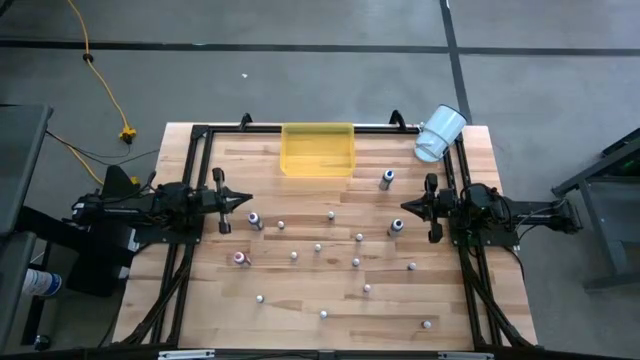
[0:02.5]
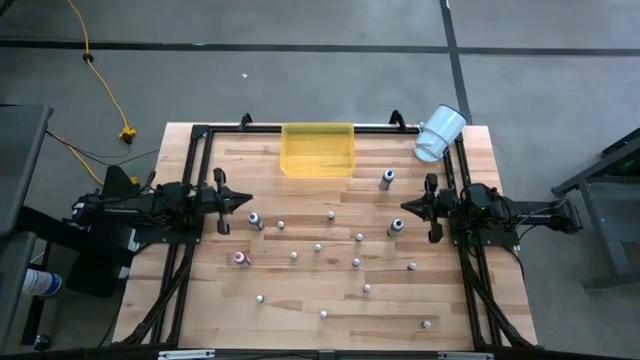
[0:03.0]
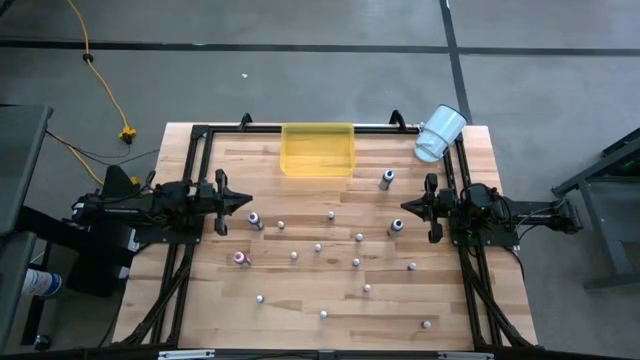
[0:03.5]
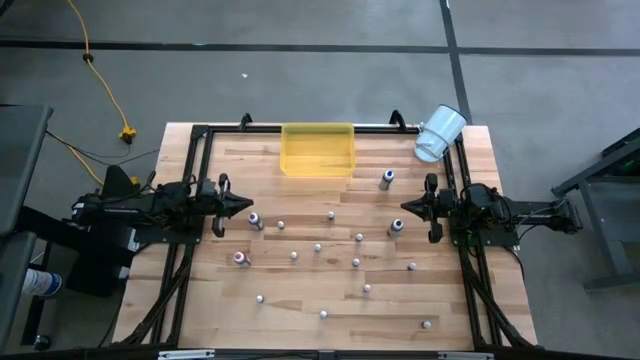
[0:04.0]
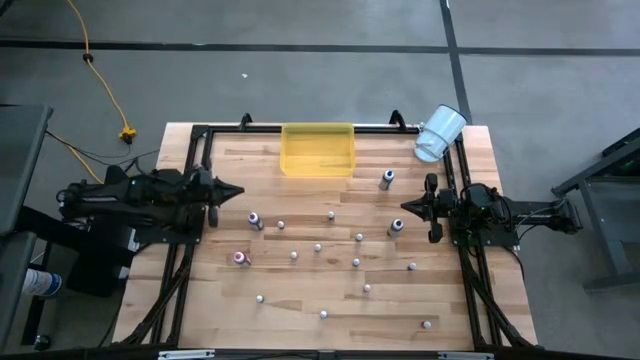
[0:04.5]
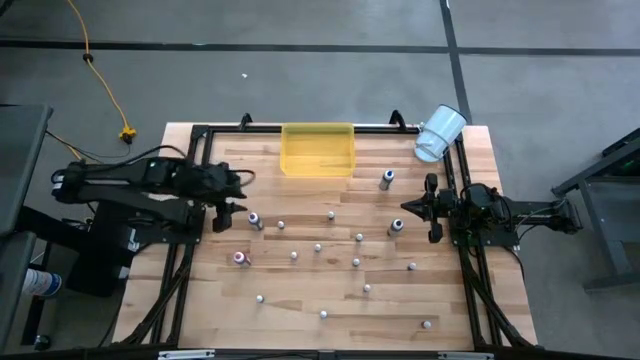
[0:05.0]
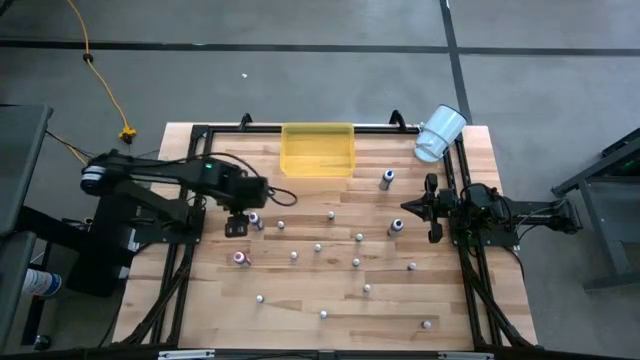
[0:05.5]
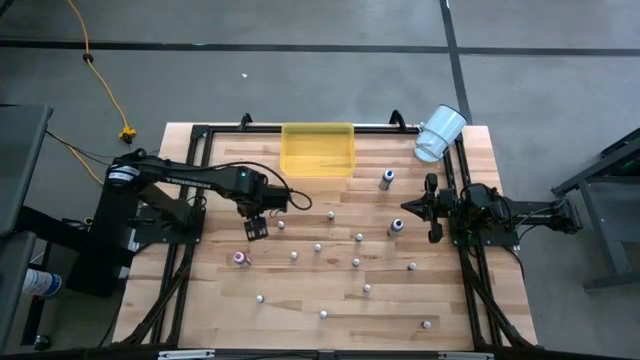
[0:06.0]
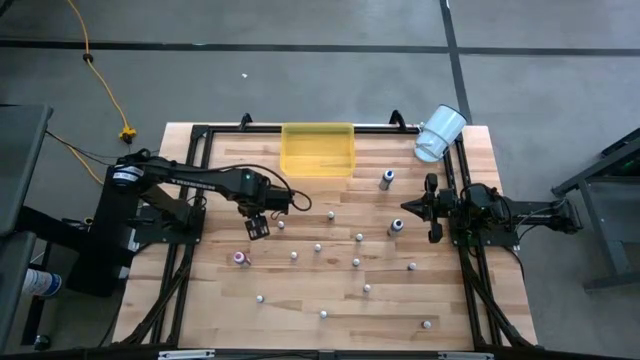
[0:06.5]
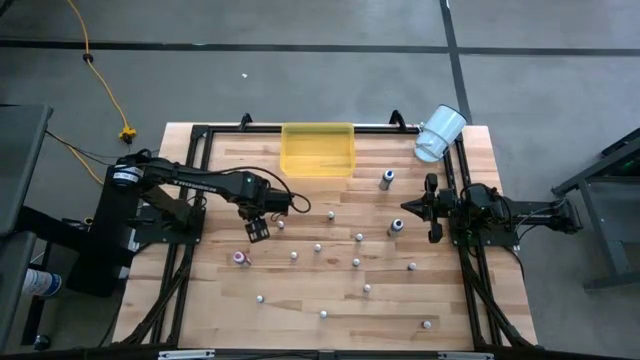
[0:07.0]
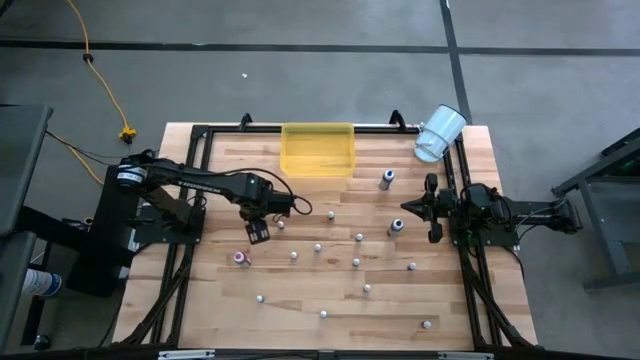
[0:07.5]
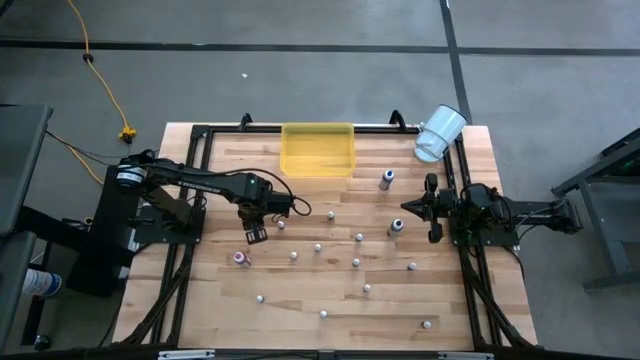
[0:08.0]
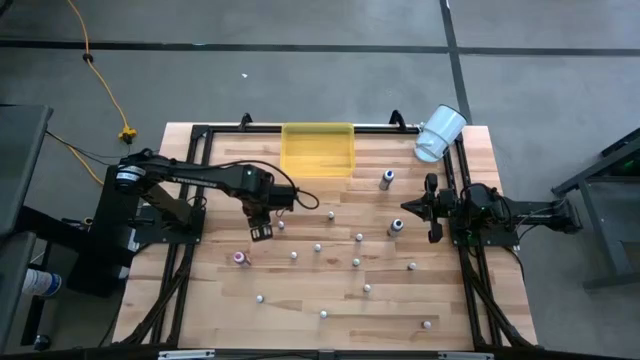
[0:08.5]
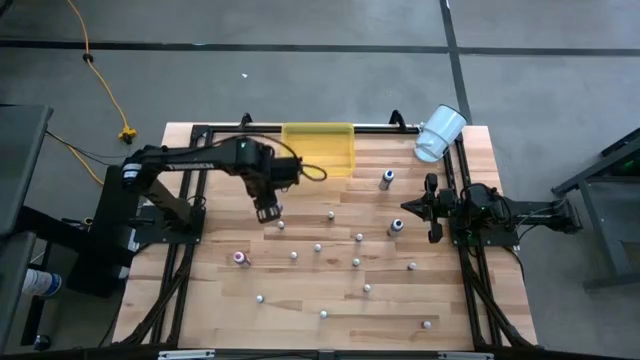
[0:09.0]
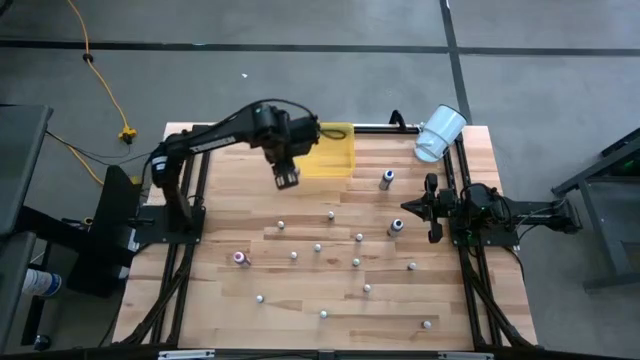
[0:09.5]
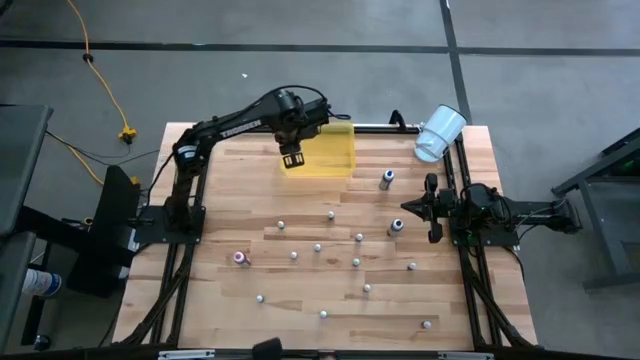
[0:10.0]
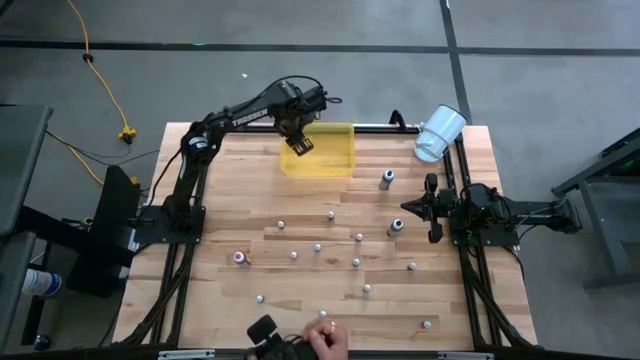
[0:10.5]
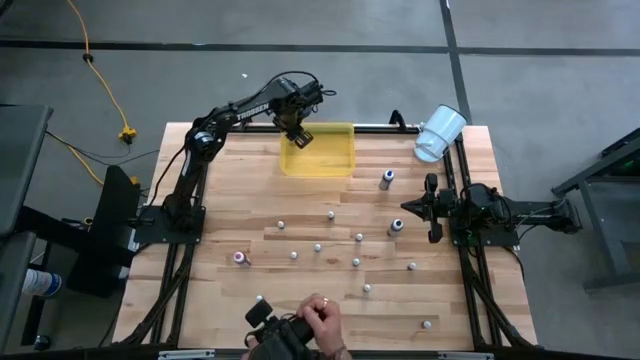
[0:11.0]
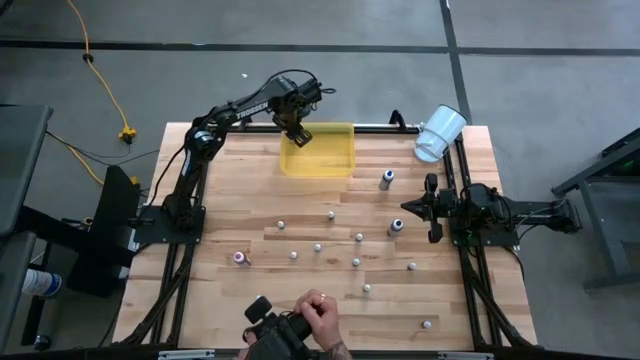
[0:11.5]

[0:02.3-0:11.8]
Task: Pick & Place food coloring
Put the large violet food coloring bottle into the yellow container

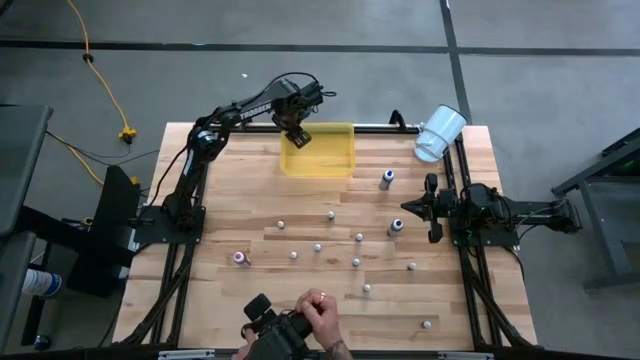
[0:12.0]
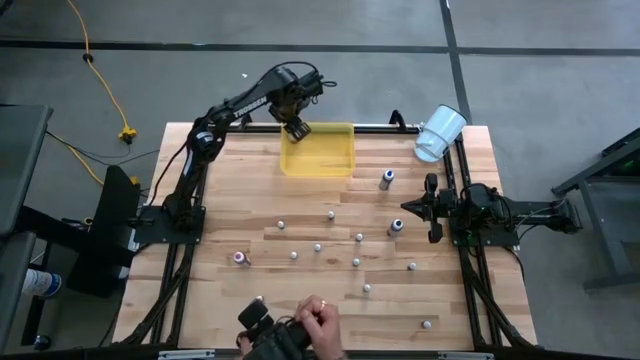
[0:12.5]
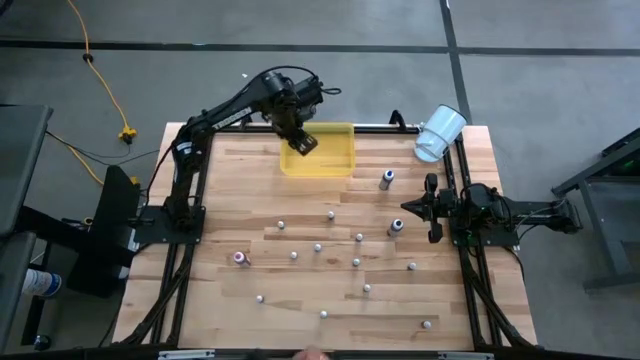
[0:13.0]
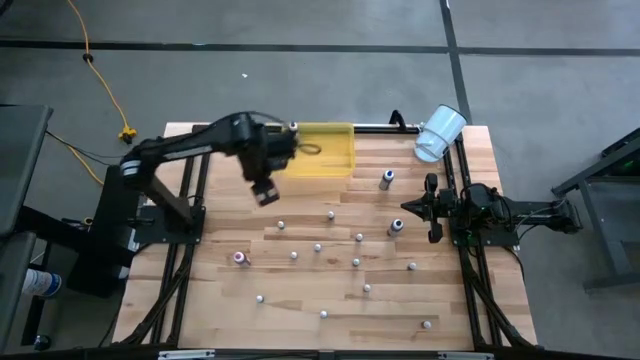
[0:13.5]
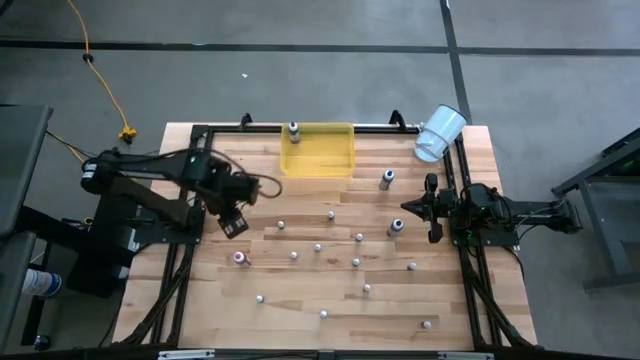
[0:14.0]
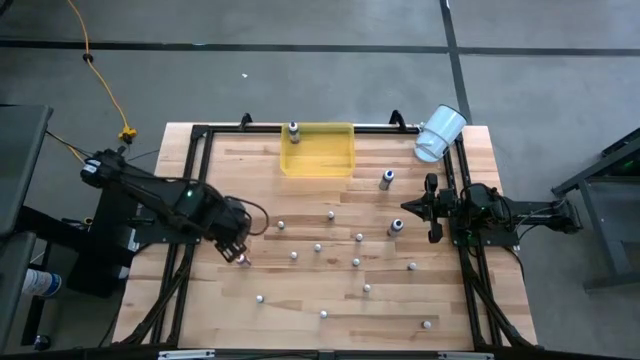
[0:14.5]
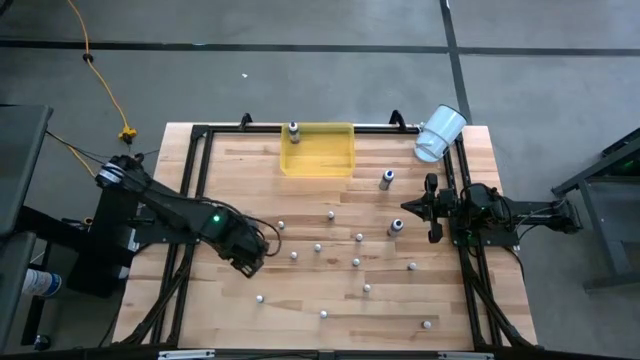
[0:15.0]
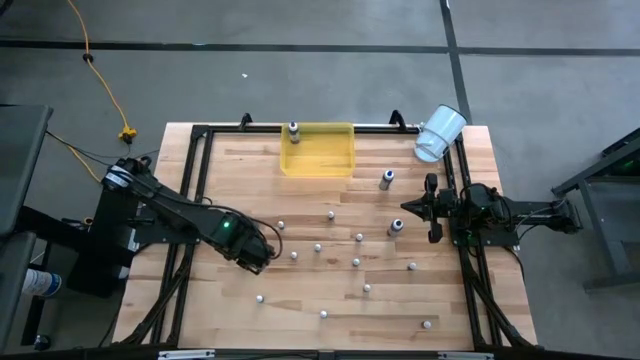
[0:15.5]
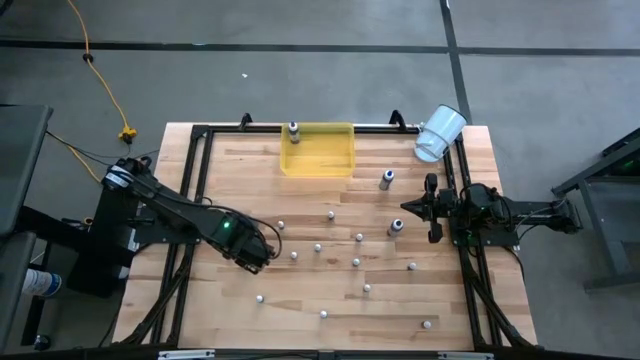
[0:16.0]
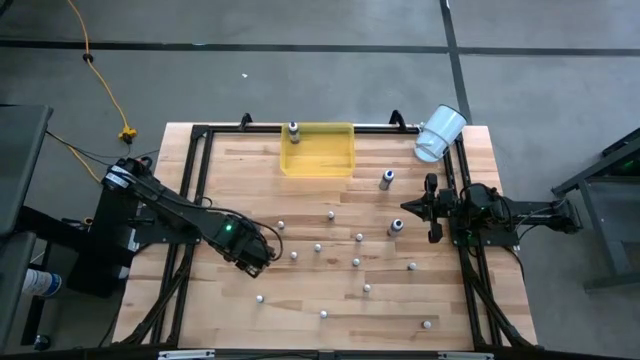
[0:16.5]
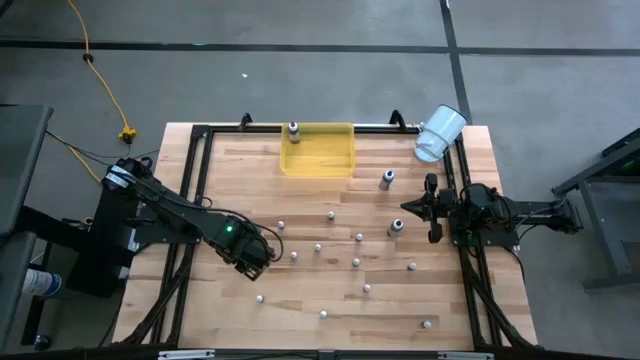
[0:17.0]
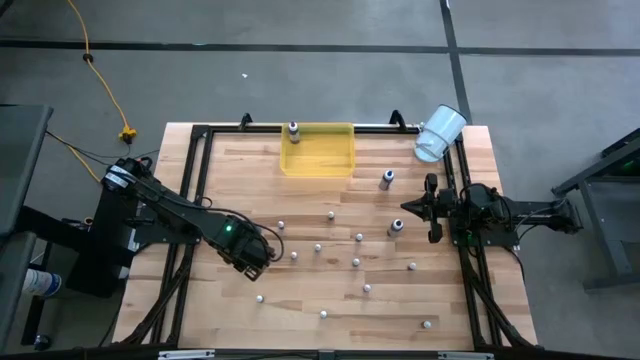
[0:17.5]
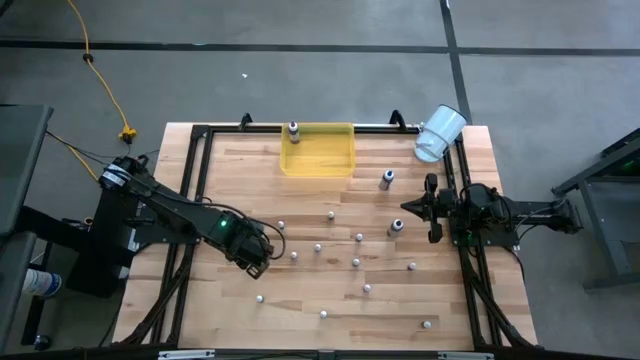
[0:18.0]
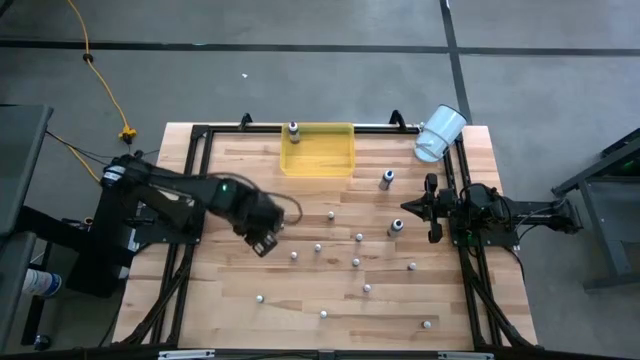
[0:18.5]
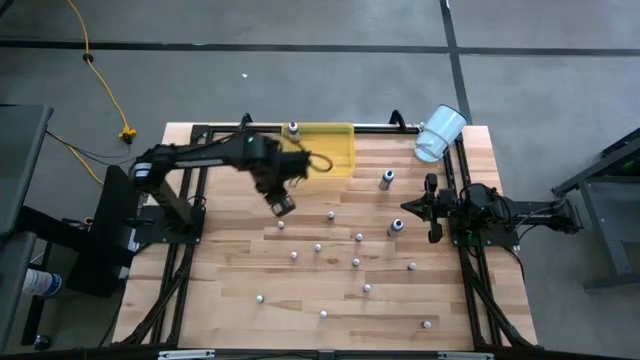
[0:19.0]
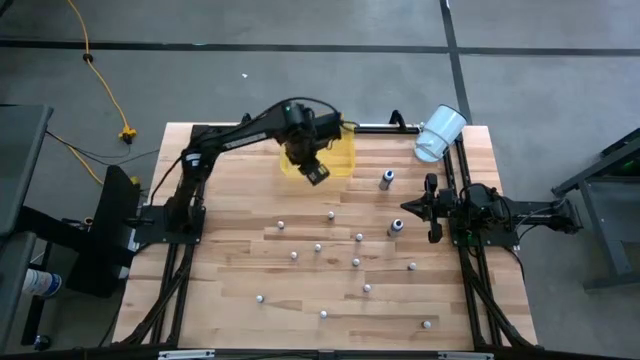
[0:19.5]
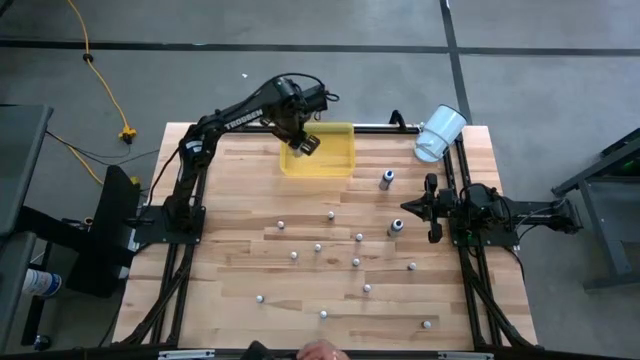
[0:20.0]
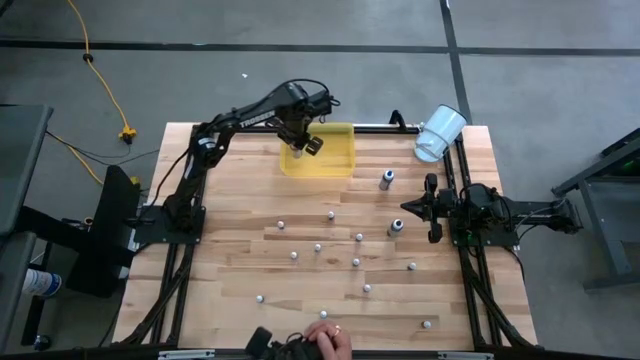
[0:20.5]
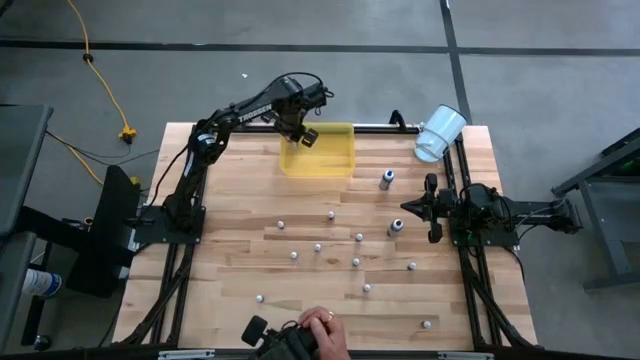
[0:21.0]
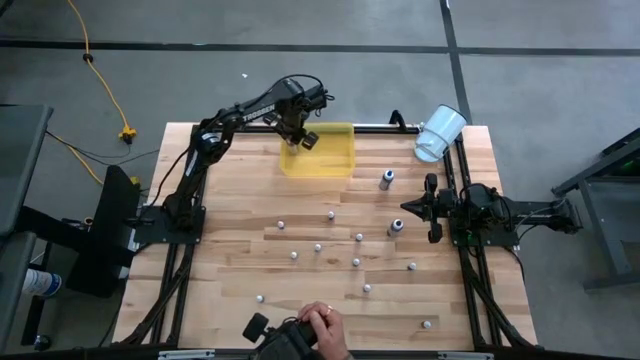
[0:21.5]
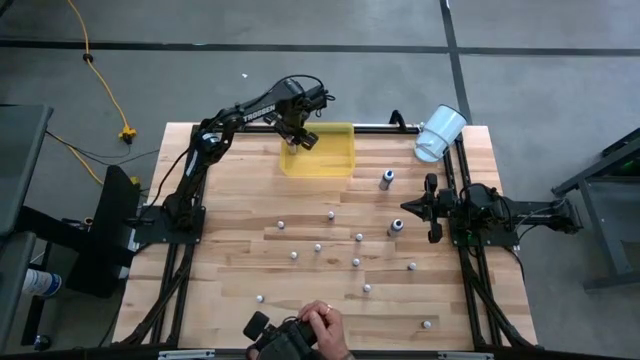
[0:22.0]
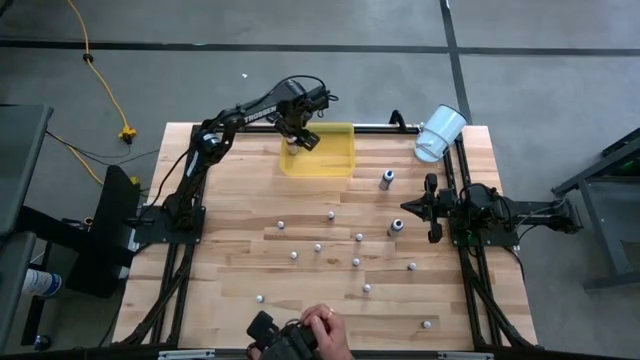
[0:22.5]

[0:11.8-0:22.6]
Put the large pink food coloring bottle into the yellow container

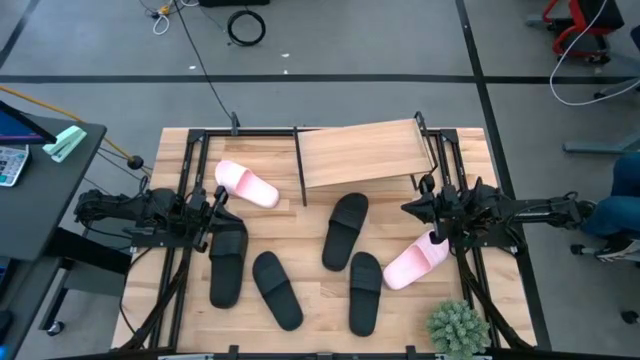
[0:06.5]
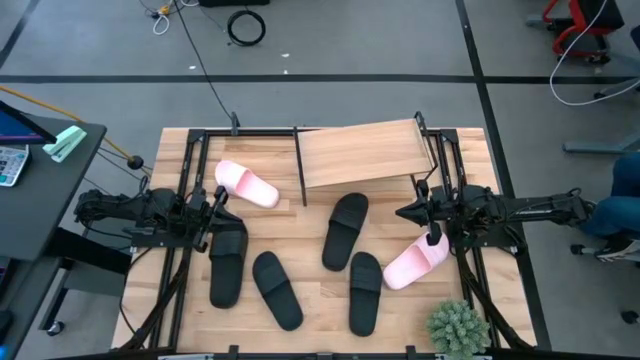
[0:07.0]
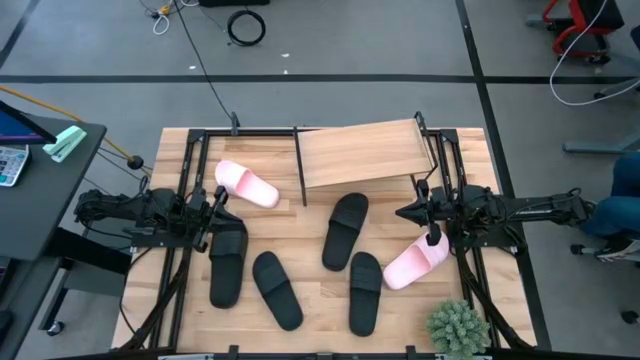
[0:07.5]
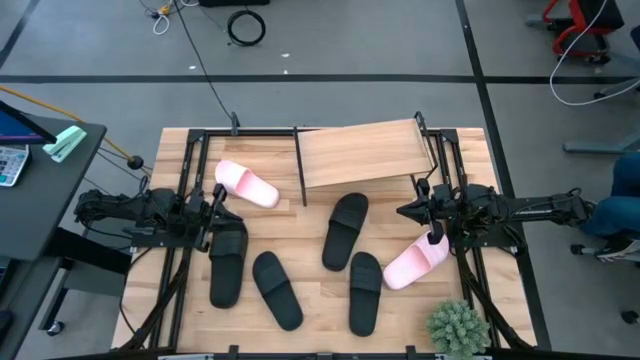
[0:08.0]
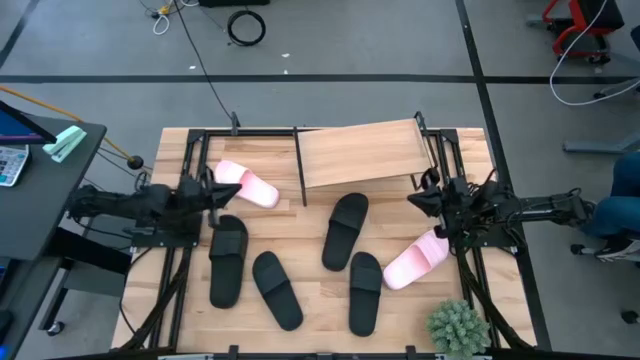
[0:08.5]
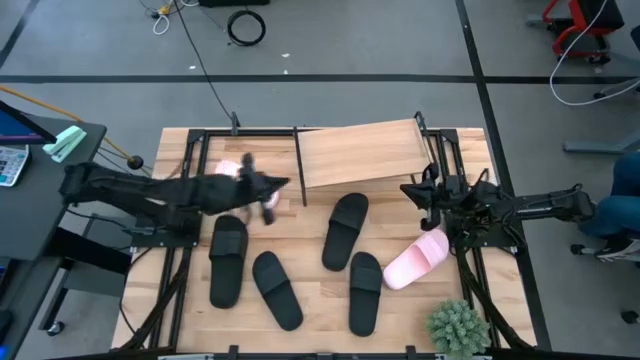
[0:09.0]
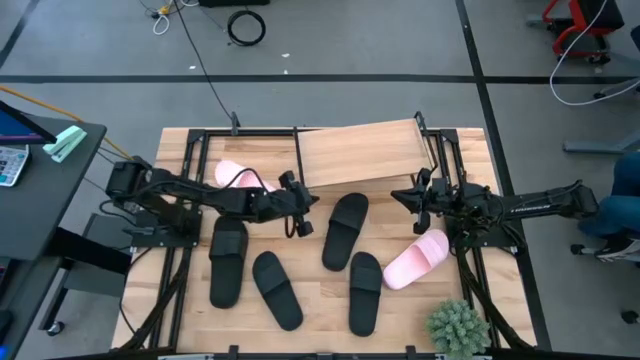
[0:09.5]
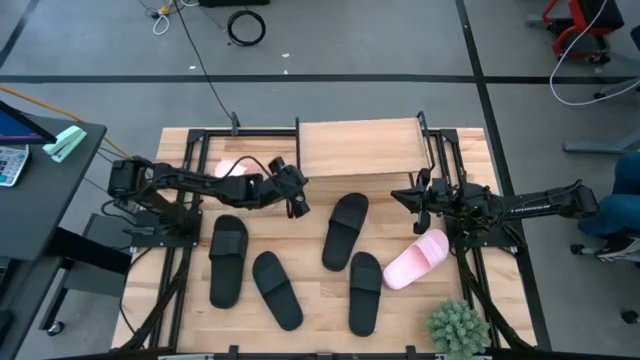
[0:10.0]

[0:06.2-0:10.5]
Task: Pick and place slides into the shelf
Prepare the shelf
